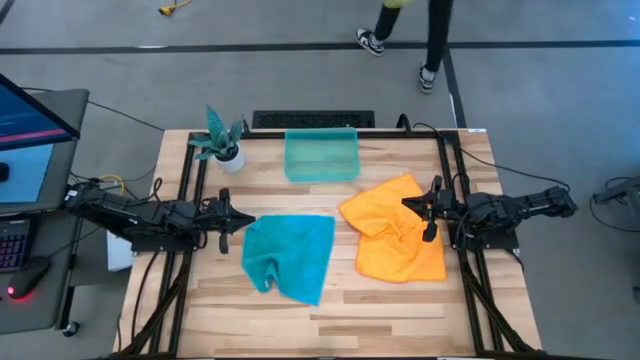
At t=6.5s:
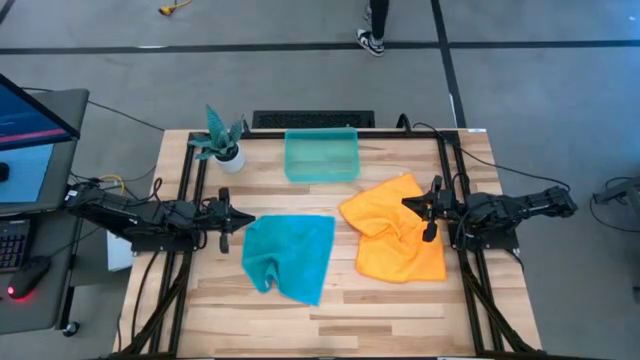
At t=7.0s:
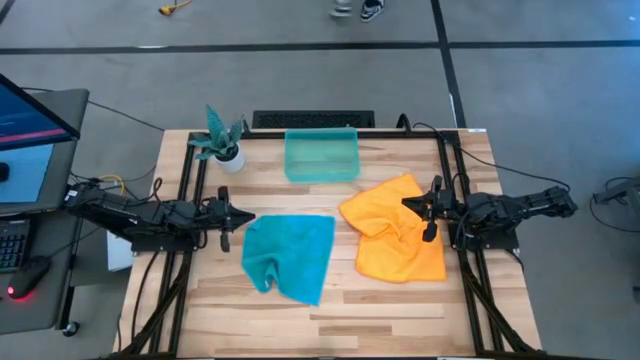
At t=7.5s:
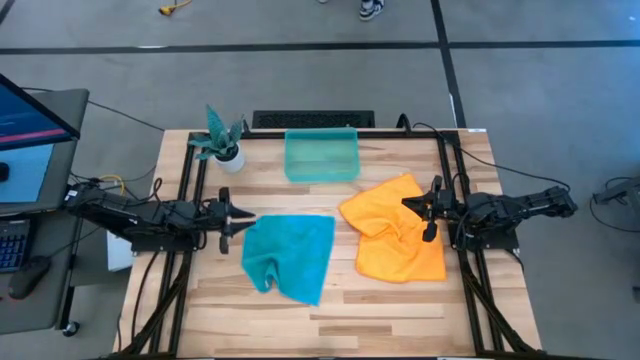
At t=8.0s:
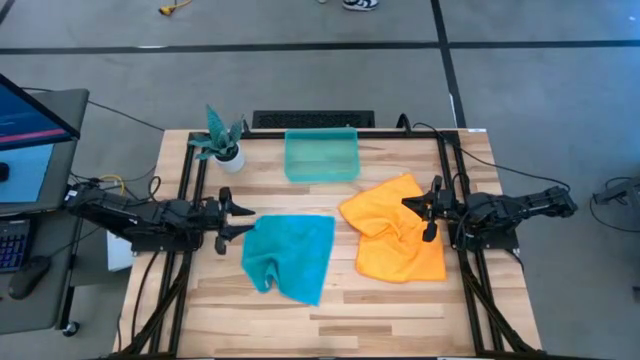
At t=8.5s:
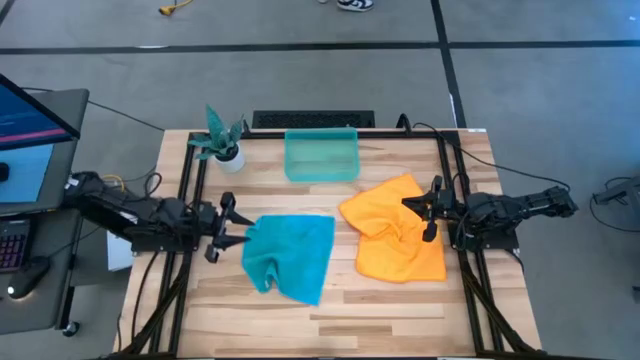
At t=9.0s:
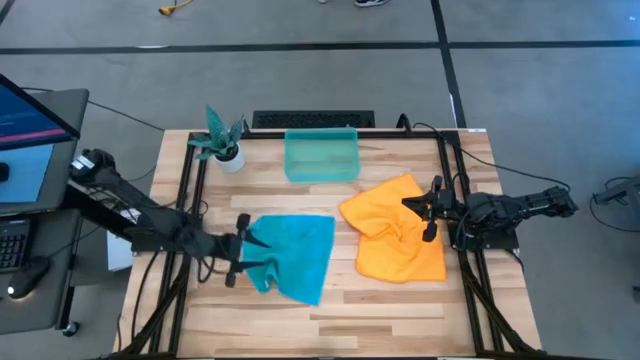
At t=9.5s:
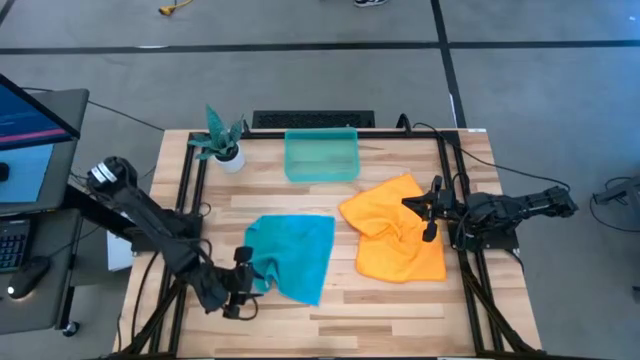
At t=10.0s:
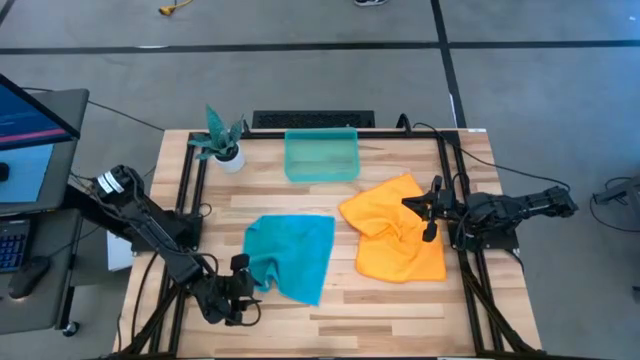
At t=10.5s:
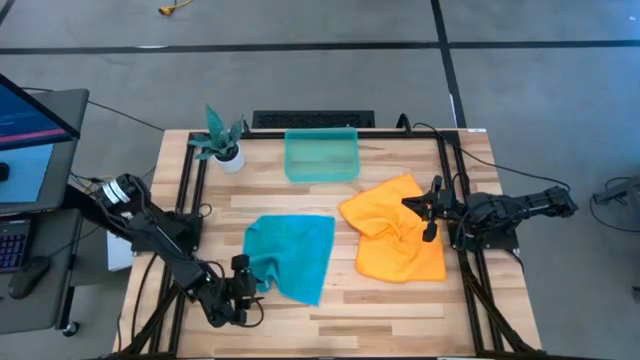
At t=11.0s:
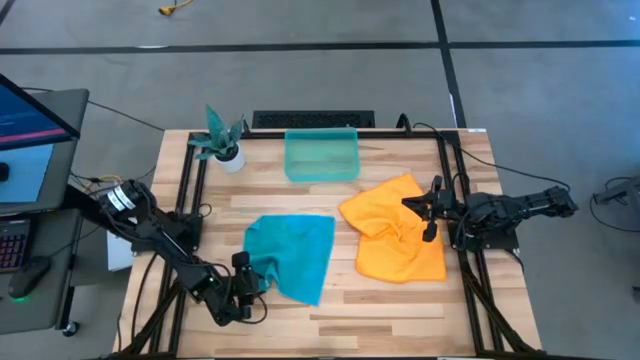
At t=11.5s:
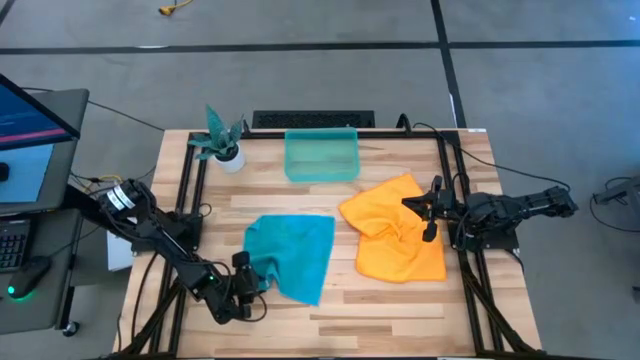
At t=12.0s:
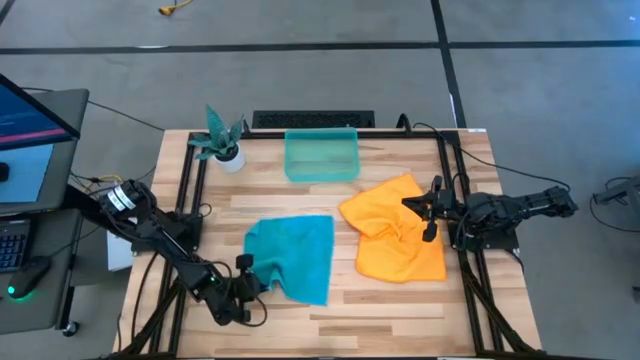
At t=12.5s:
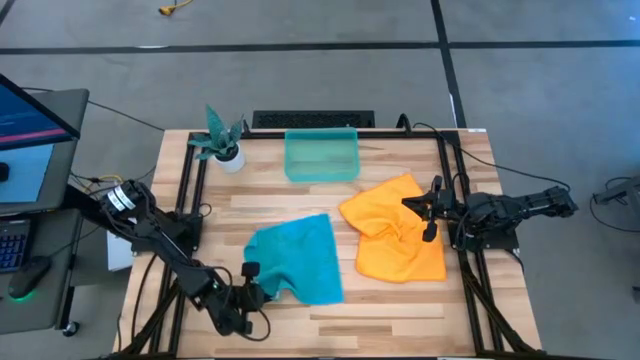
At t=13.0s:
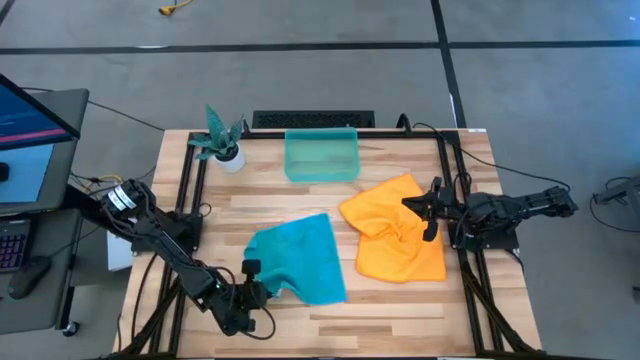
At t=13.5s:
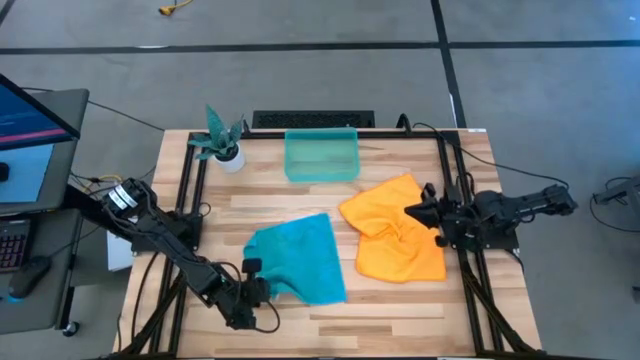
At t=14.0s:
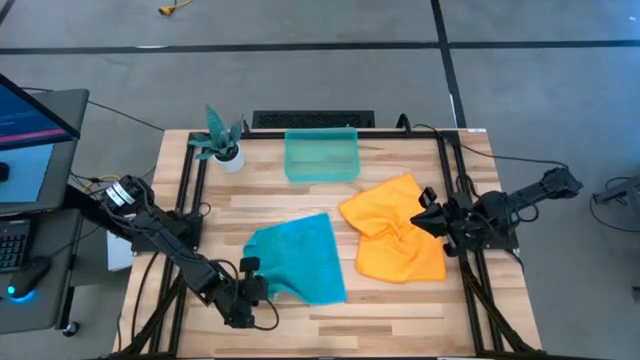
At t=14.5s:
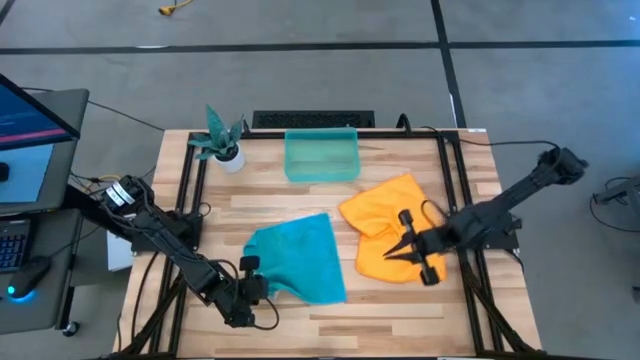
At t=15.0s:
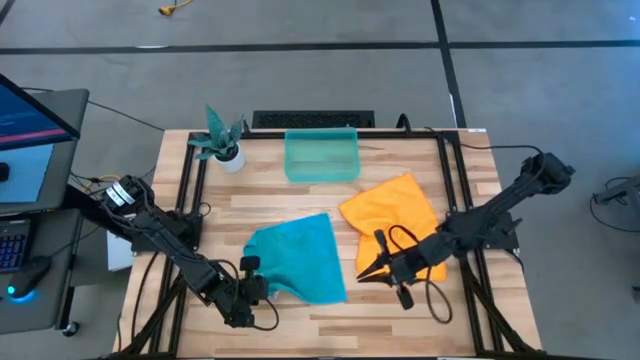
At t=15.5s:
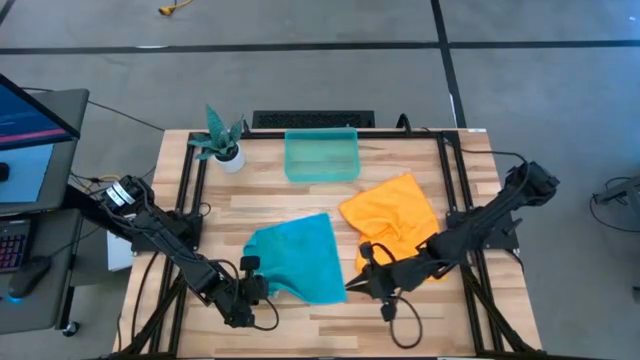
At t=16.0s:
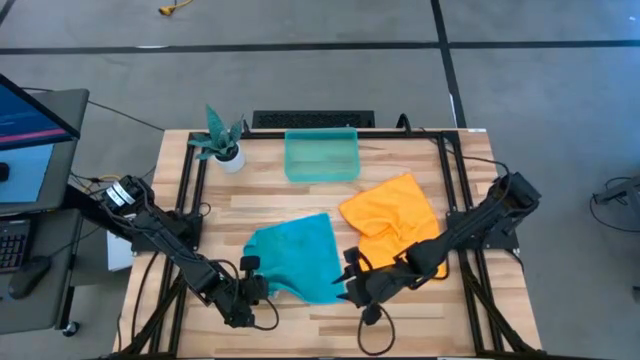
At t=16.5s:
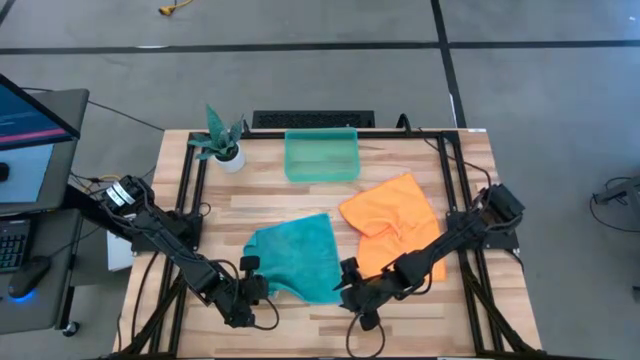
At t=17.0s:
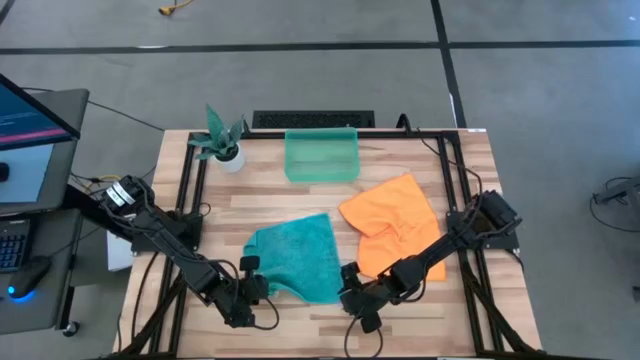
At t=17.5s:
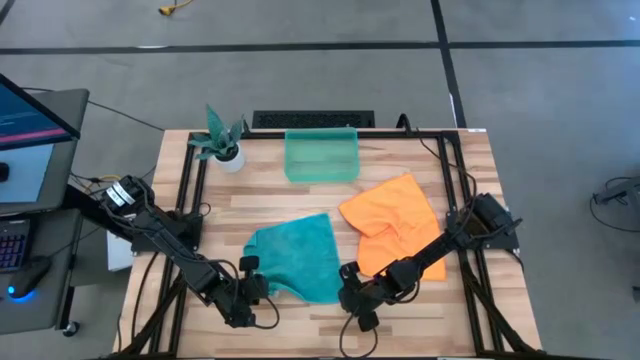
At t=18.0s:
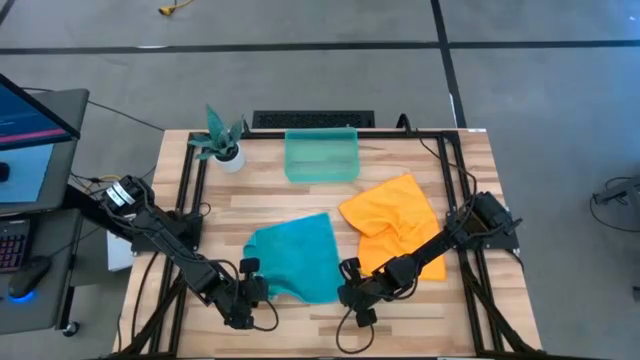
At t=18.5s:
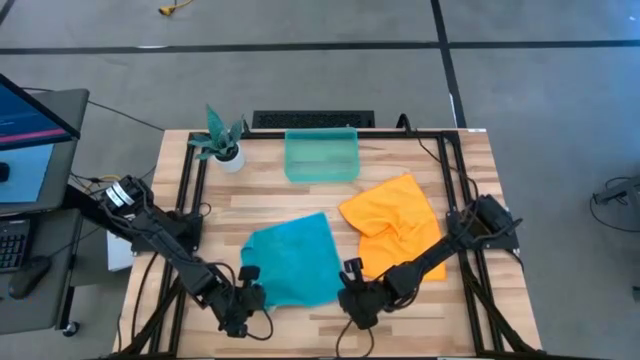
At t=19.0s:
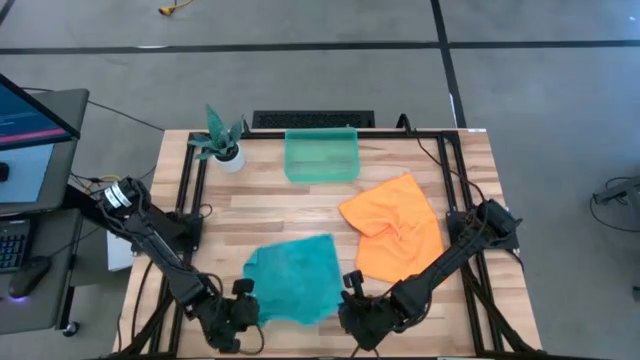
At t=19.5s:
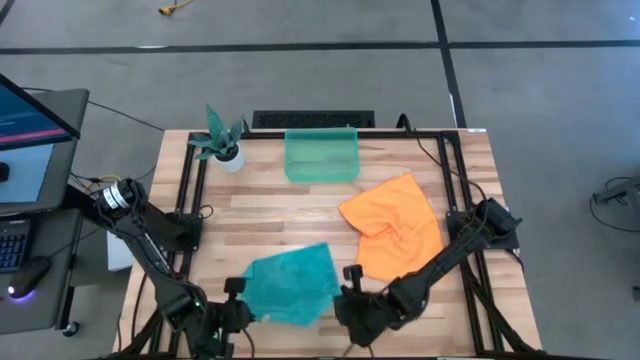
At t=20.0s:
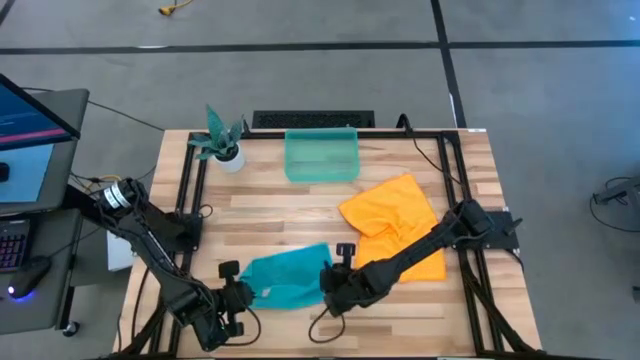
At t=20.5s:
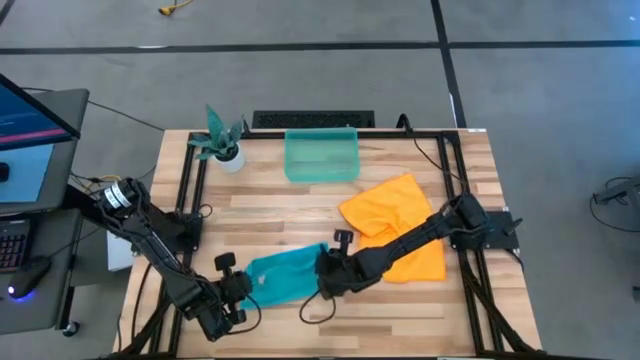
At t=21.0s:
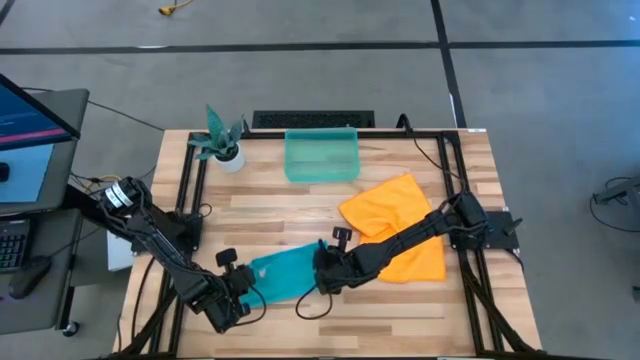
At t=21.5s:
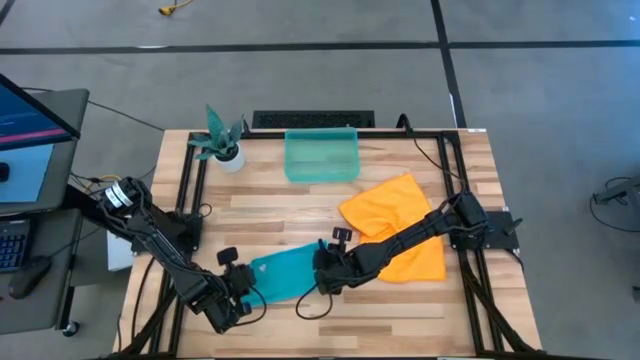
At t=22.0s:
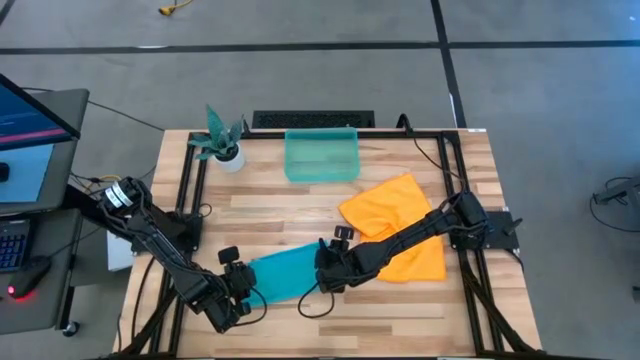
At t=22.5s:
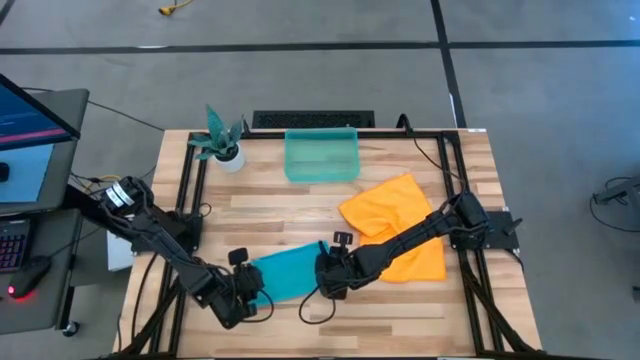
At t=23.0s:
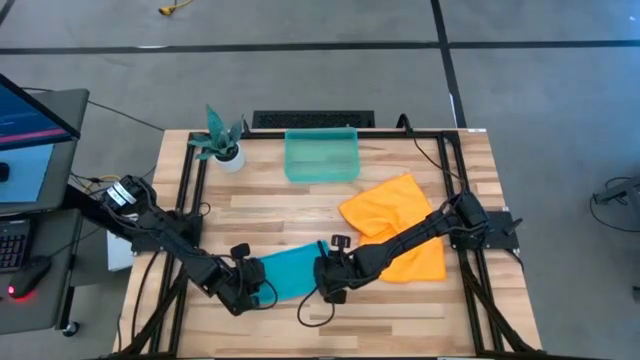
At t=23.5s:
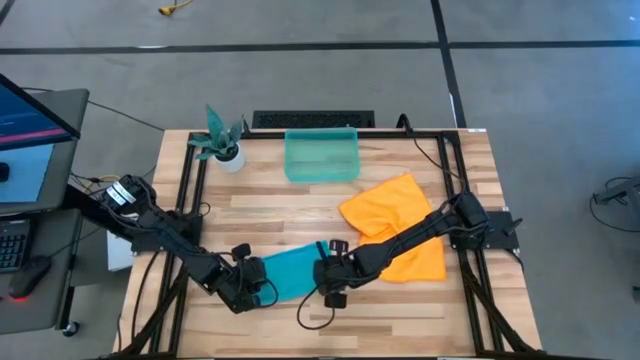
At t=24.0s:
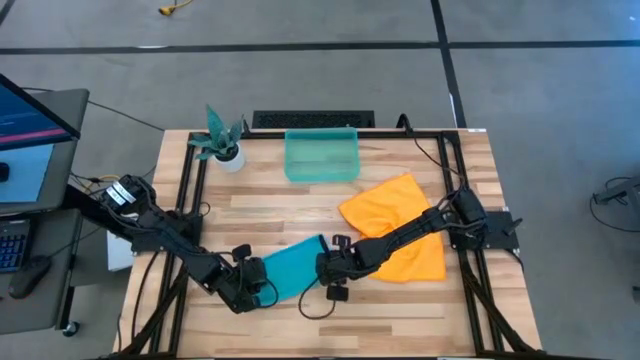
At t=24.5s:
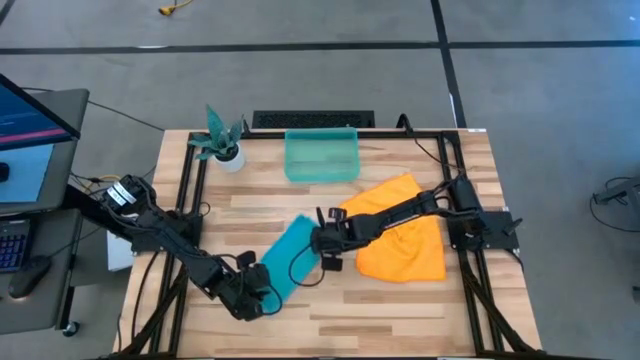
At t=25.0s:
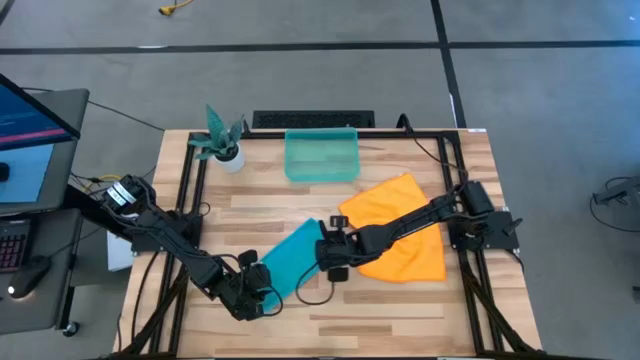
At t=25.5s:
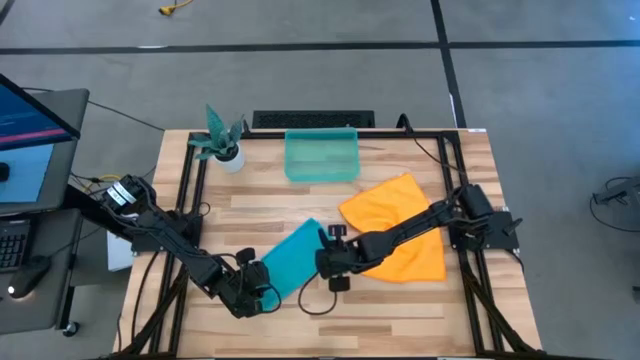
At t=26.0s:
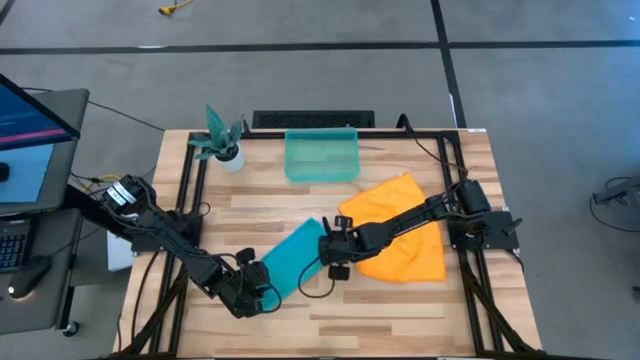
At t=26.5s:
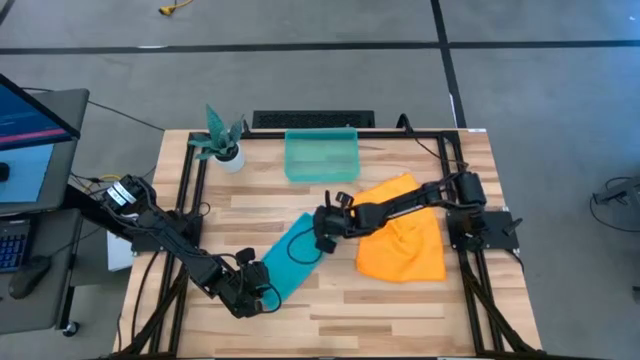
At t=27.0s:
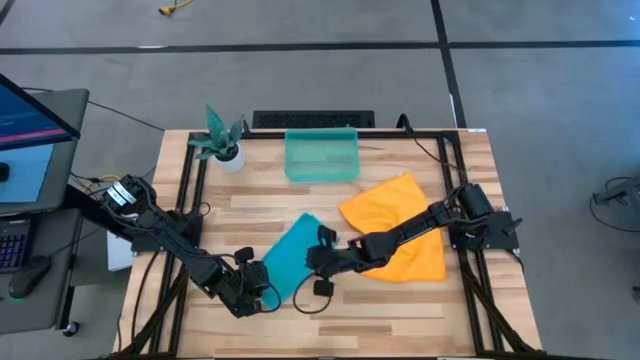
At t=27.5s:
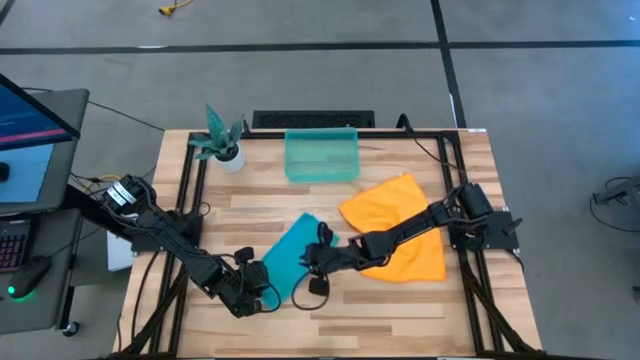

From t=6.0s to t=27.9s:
Task: Roll microfiber towels into tight, uniform cylinder then place into a basket
Roll the blue microfiber cloth
